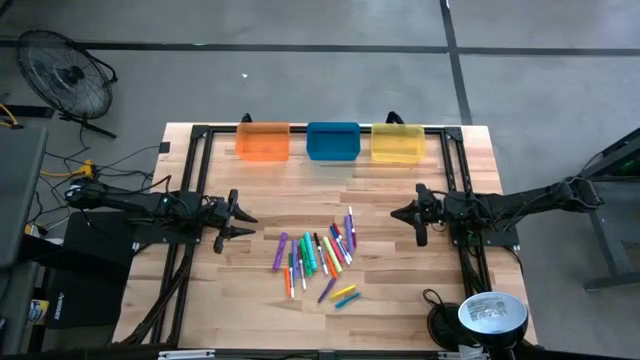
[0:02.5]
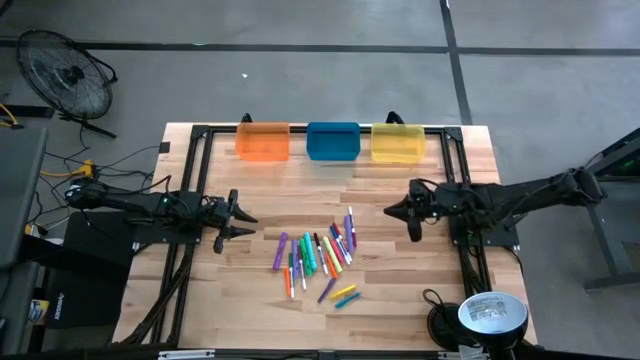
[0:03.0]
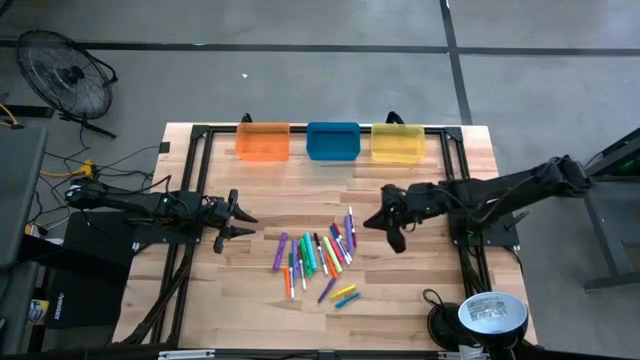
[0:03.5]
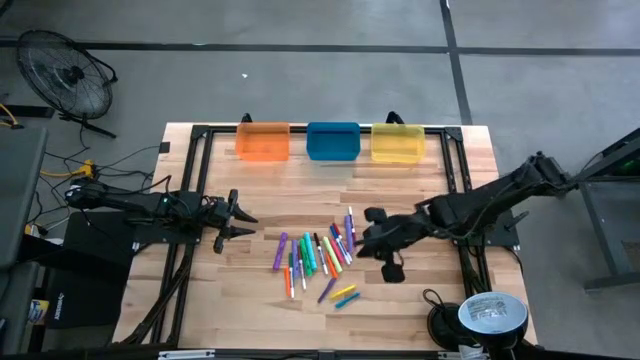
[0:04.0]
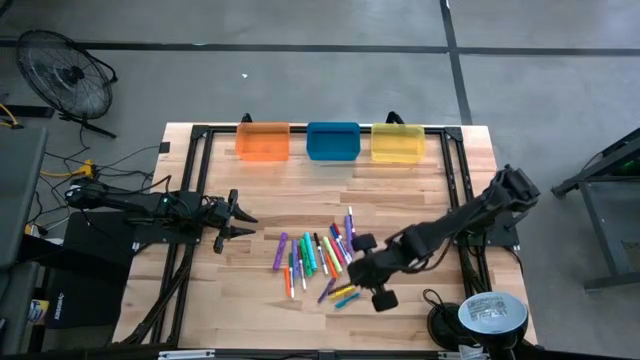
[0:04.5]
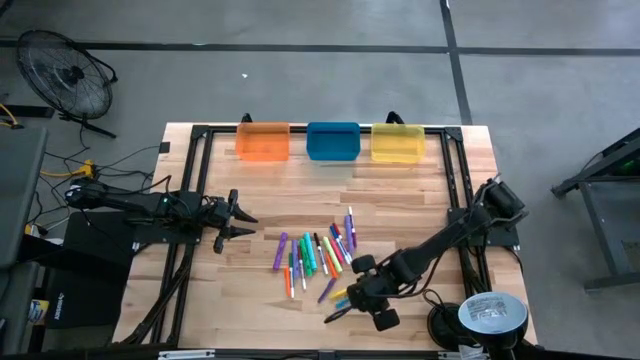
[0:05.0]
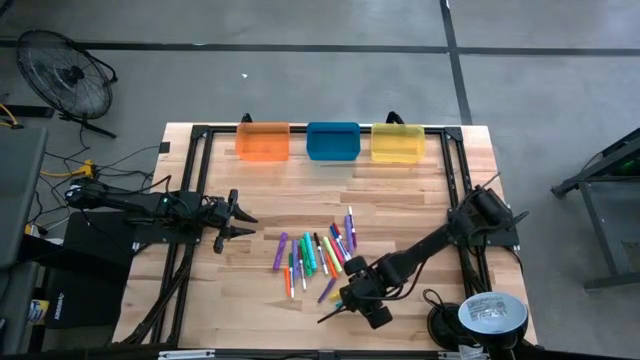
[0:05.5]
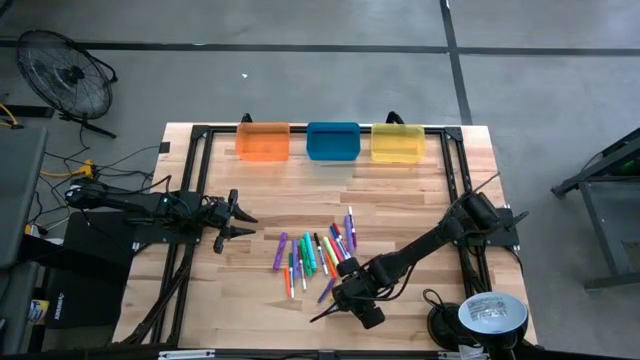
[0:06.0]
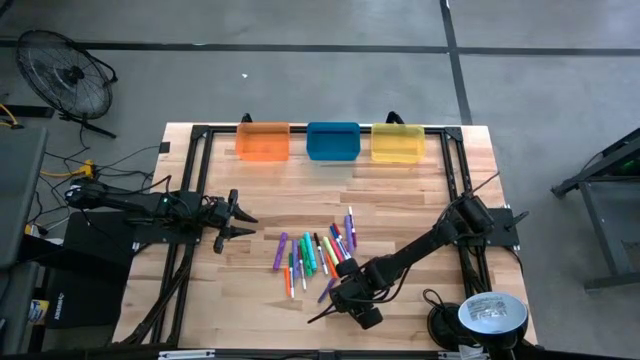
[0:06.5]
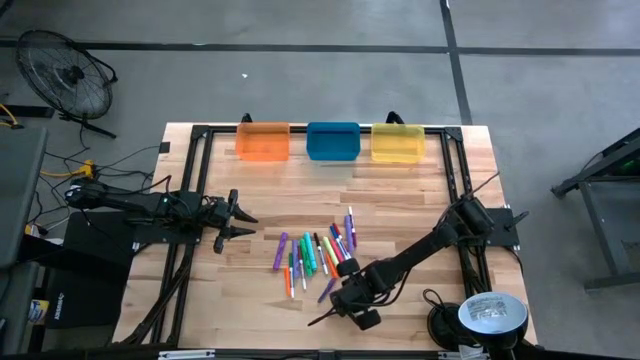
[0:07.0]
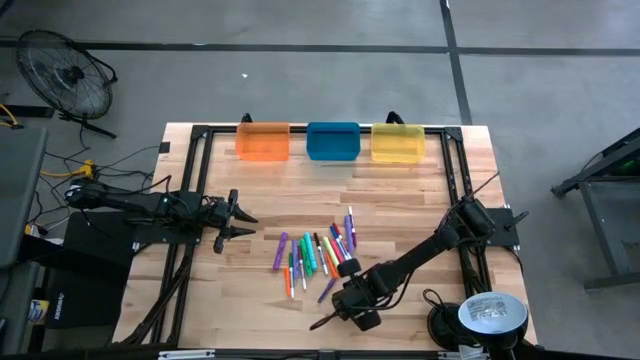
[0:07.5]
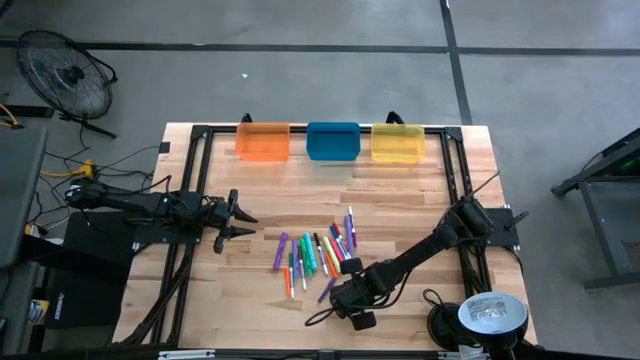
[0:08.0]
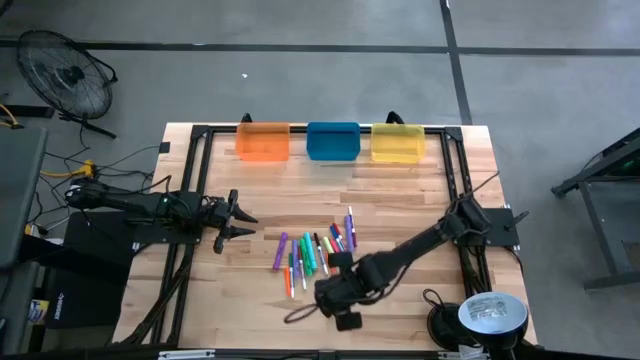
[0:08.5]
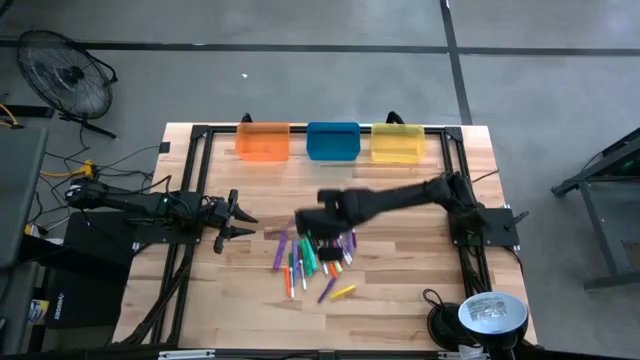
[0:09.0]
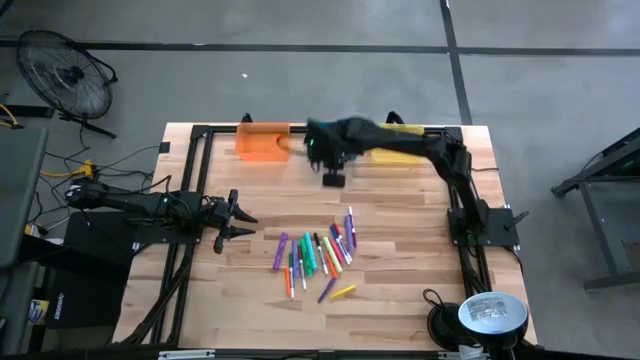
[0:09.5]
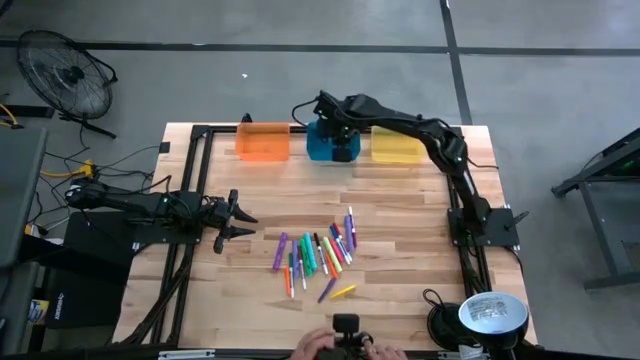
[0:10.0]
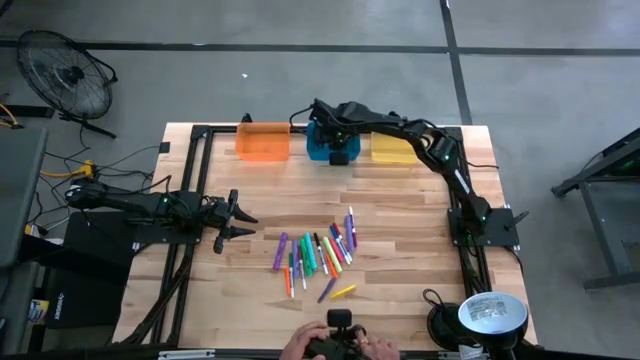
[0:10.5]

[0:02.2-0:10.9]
Task: Pick & Place Markers
Put the blue pen into the blue bin

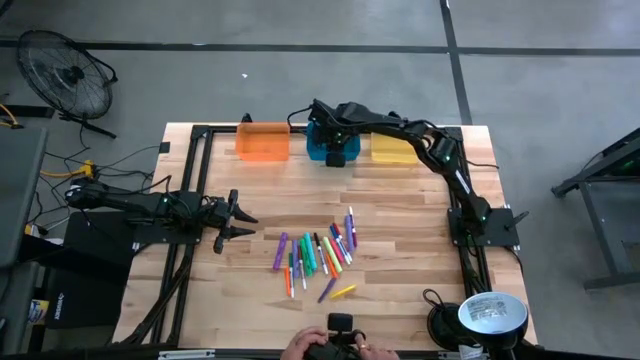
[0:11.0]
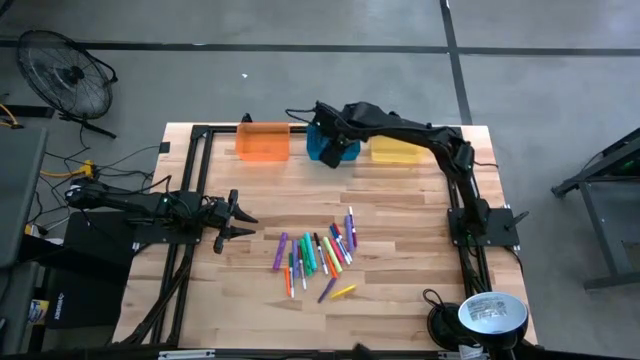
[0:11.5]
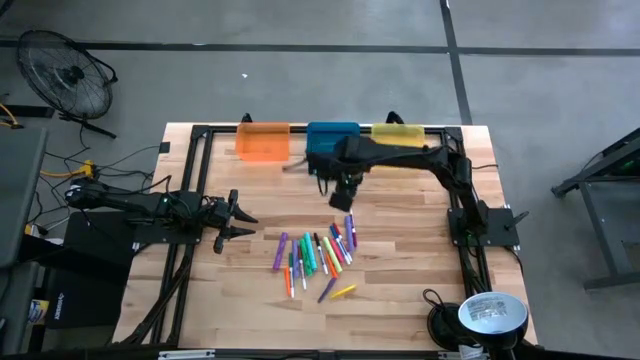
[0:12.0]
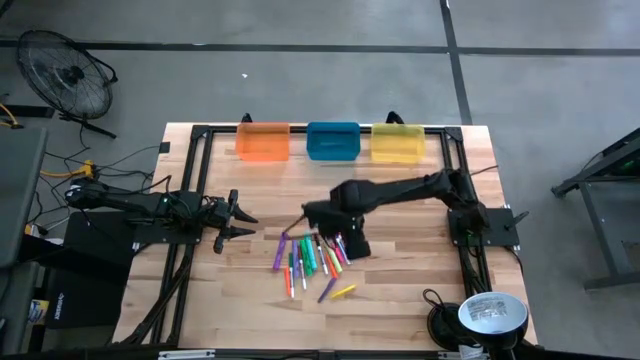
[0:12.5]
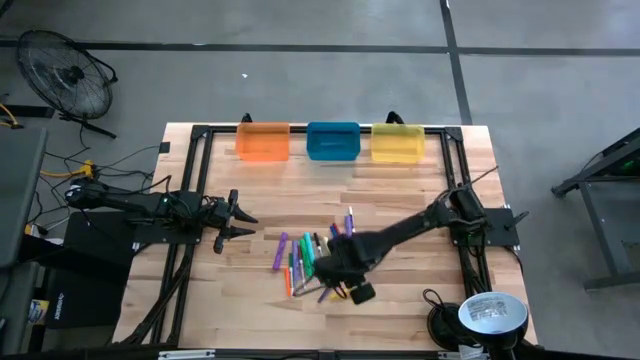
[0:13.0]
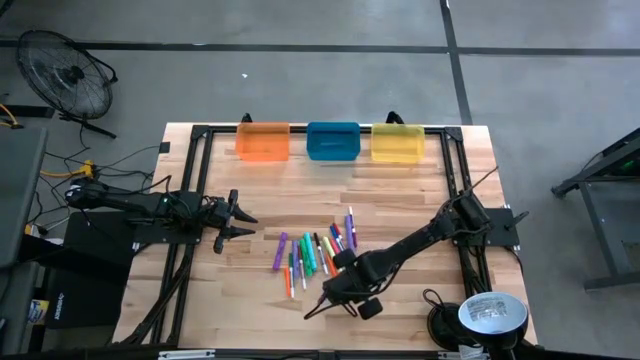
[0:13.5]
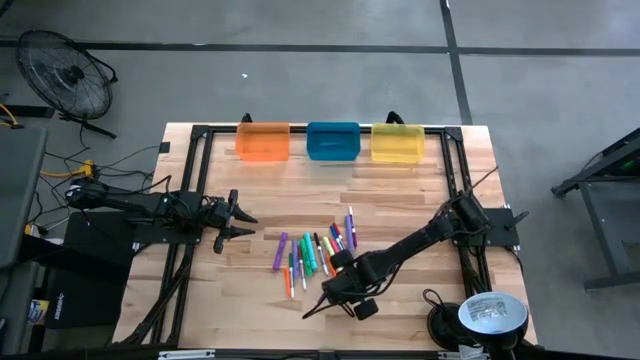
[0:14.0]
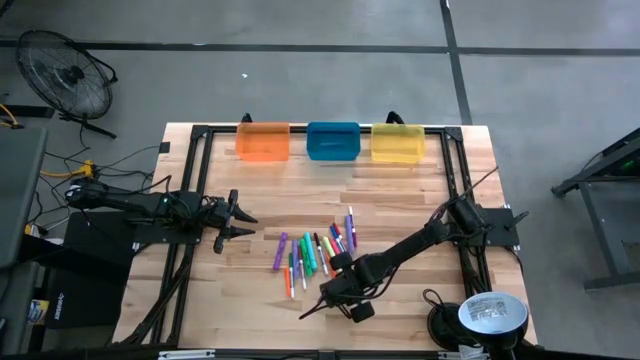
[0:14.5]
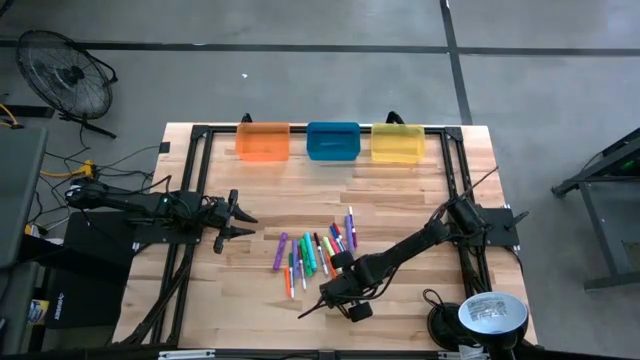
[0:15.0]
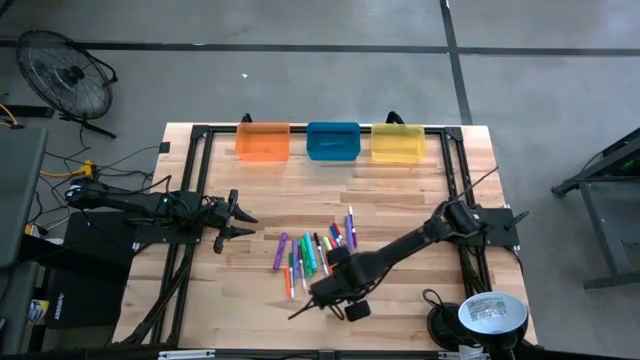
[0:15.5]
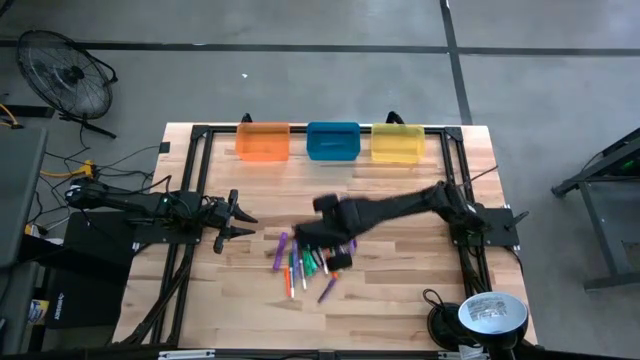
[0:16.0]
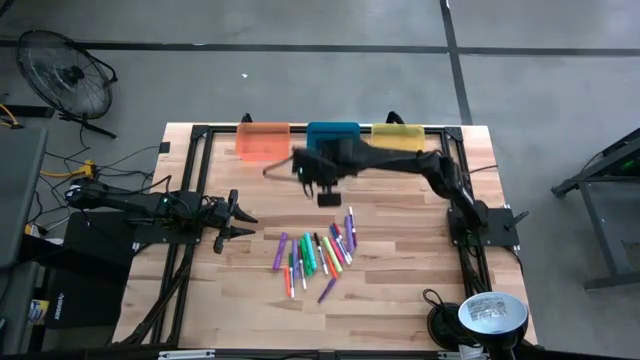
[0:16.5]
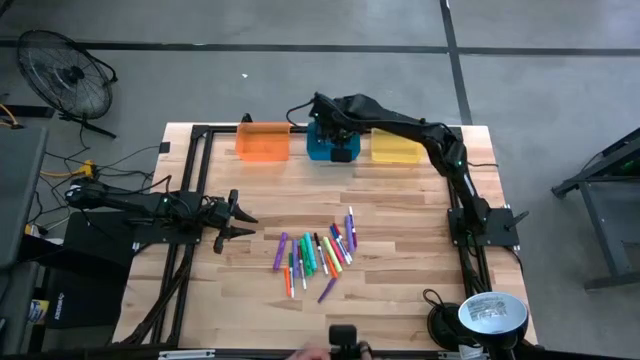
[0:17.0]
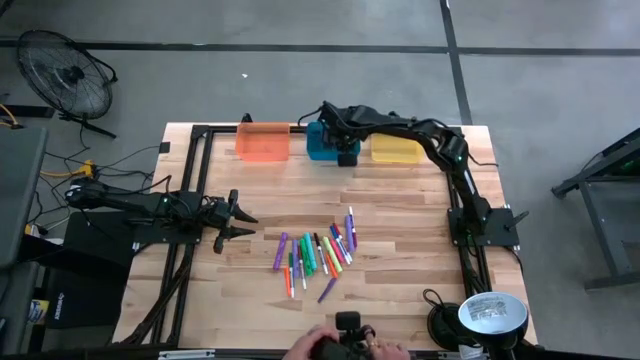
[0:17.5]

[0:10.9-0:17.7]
Put the yellow pen into the blue bin

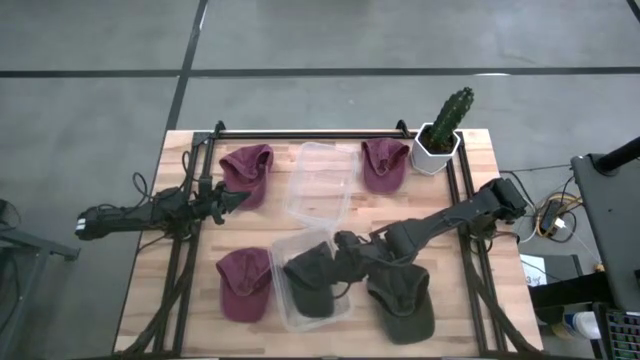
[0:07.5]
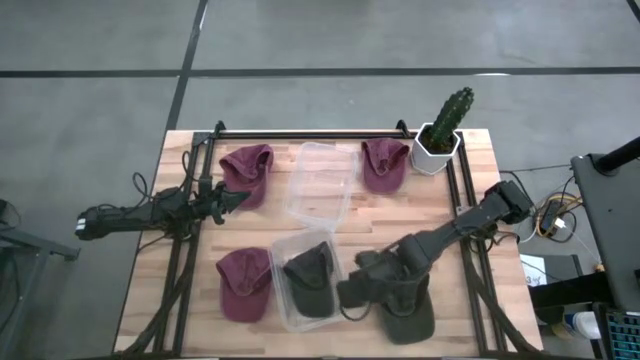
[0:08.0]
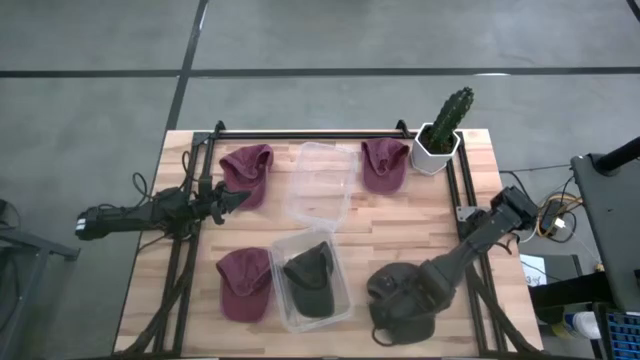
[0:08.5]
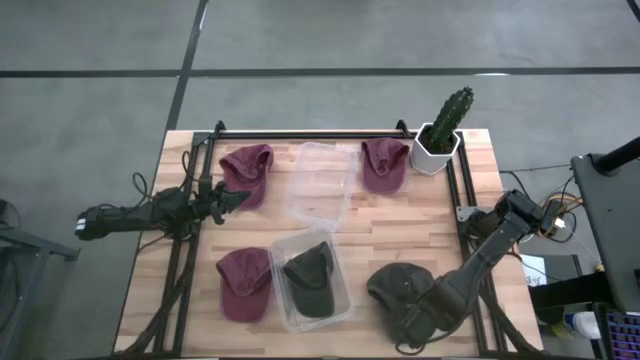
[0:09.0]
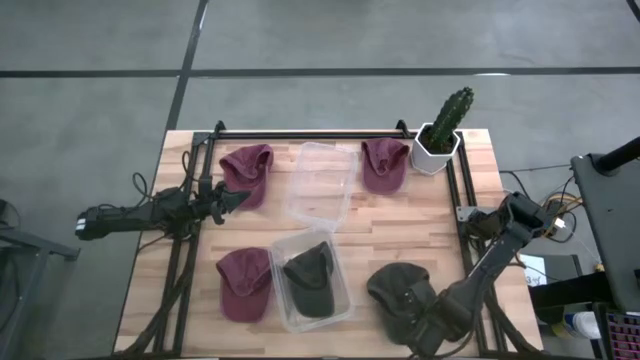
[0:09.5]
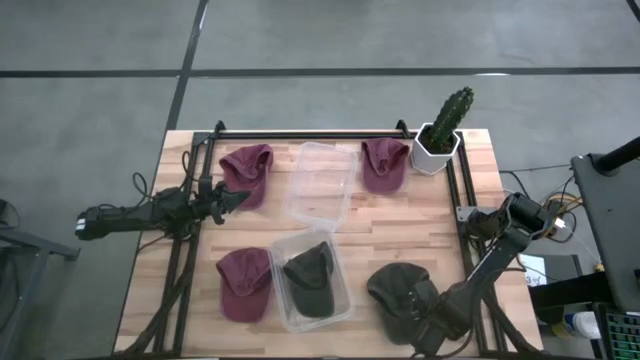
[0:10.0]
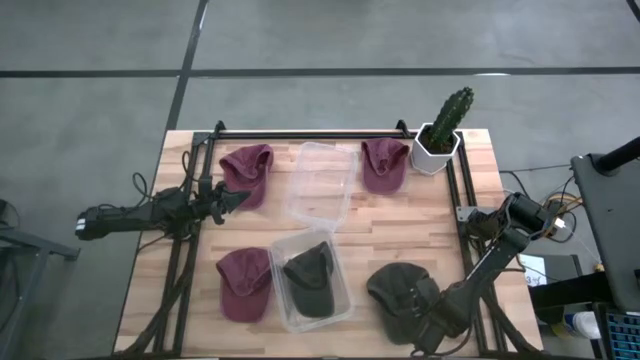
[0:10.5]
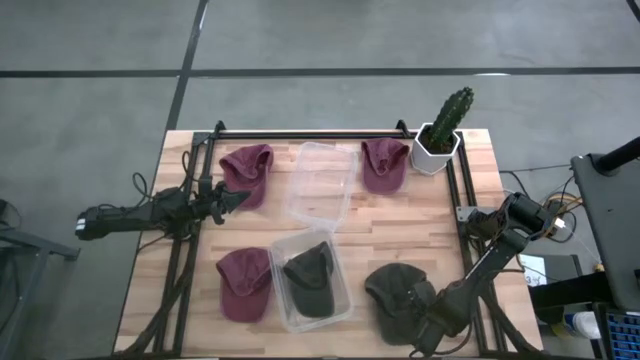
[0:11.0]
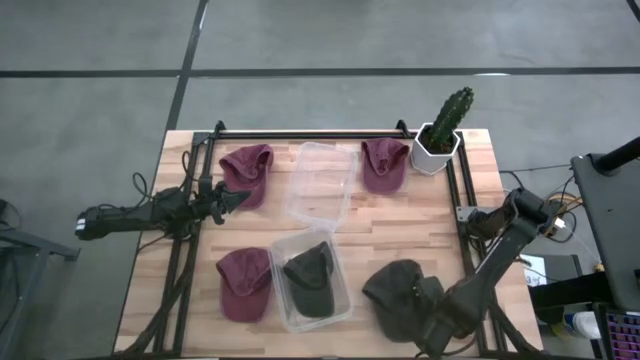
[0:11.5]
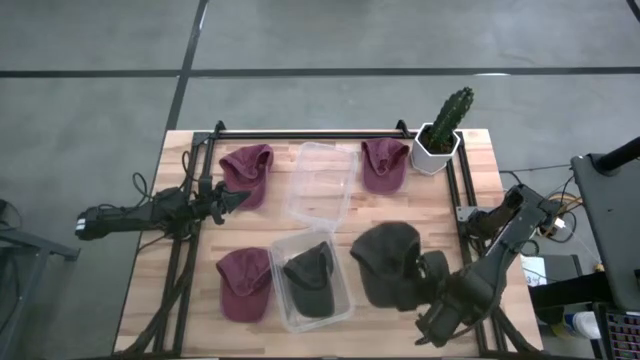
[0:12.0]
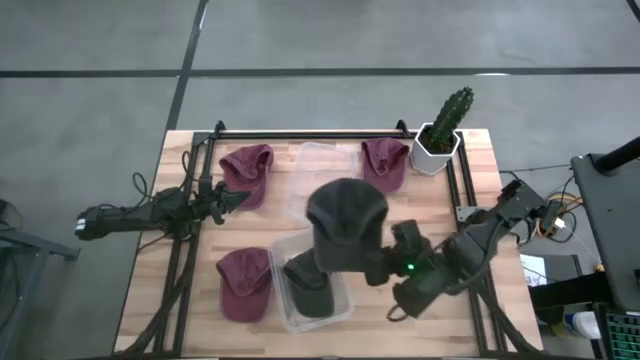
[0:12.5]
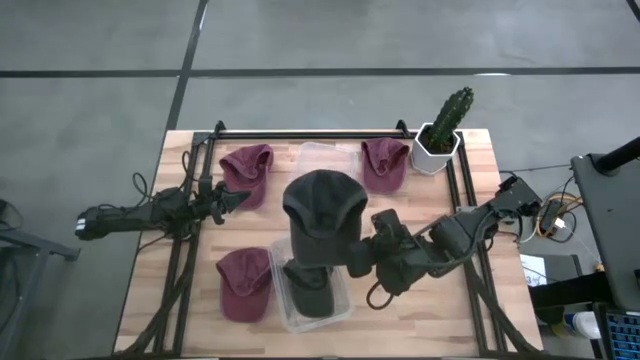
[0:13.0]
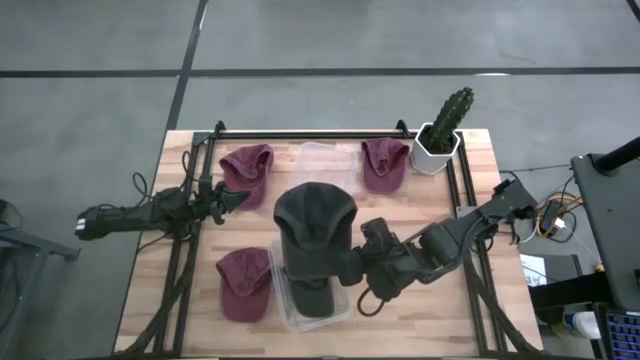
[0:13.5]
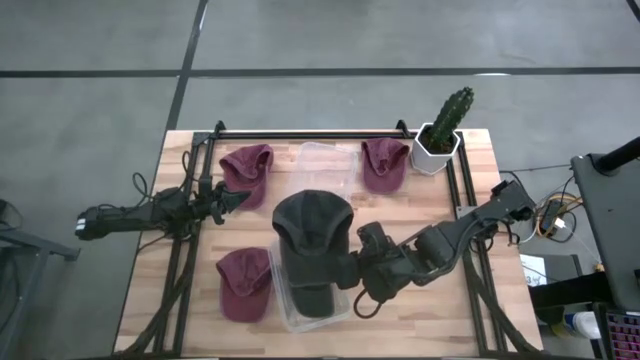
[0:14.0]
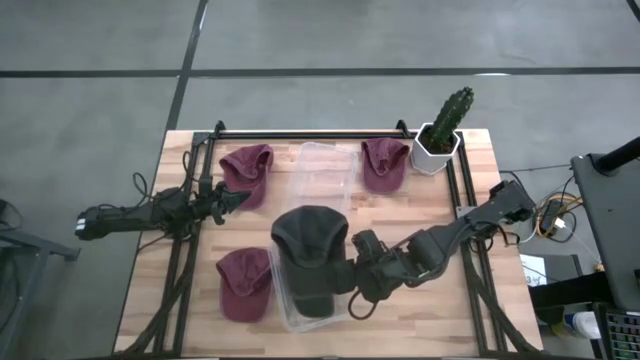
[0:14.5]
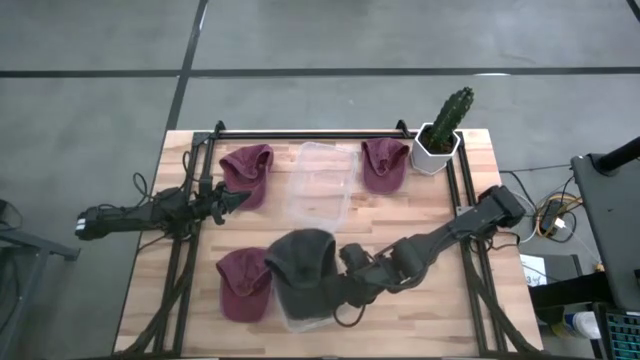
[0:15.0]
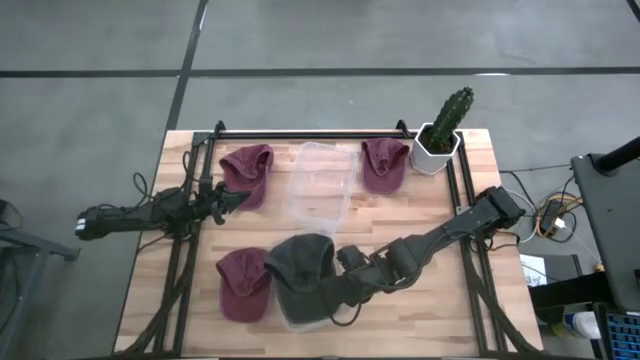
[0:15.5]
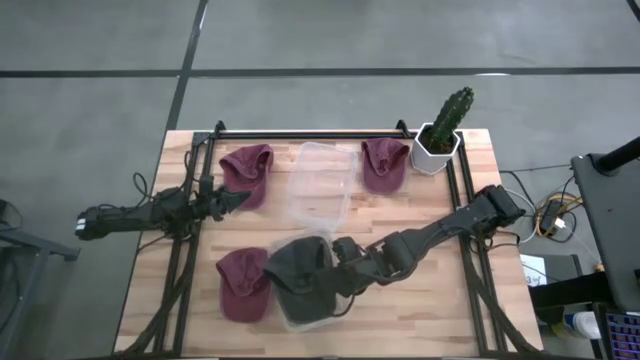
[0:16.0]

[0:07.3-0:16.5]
Task: Pick & Place hat
Put the black cap into the bottom transparent bin
